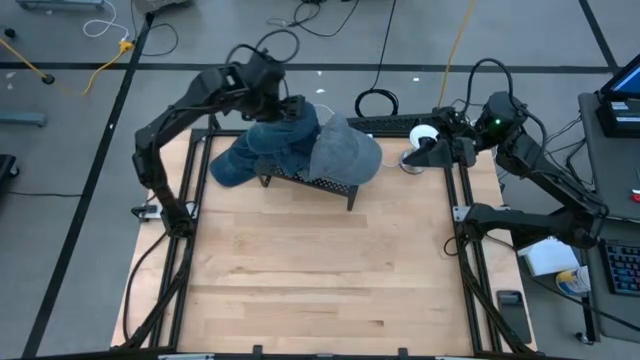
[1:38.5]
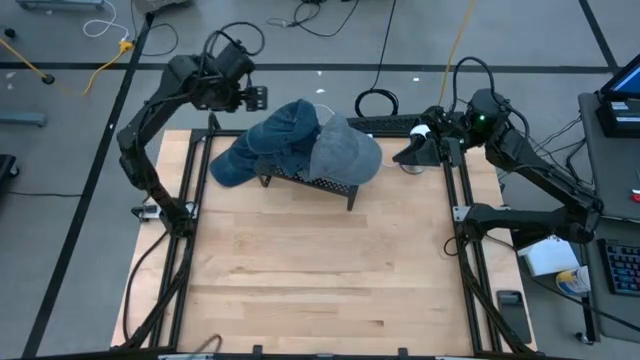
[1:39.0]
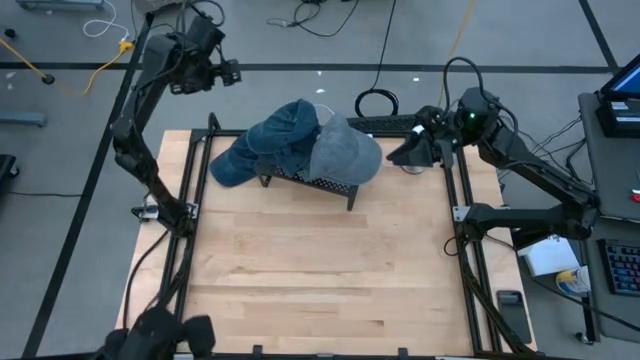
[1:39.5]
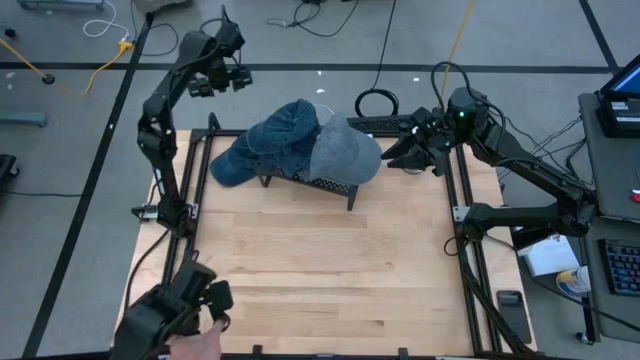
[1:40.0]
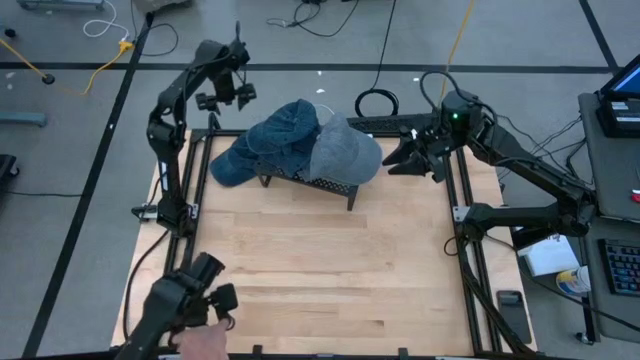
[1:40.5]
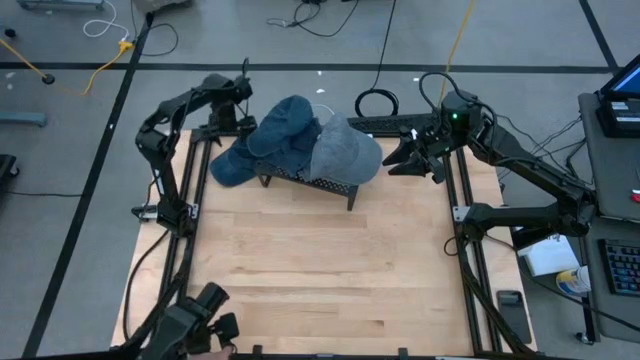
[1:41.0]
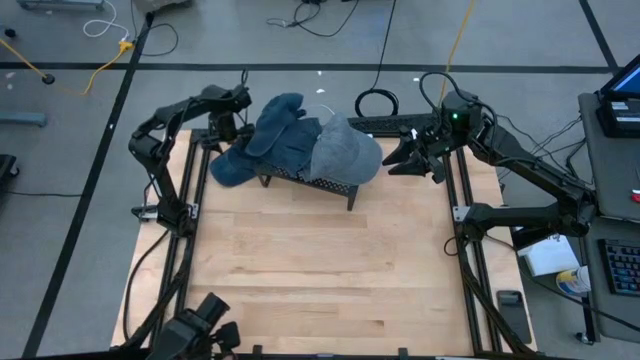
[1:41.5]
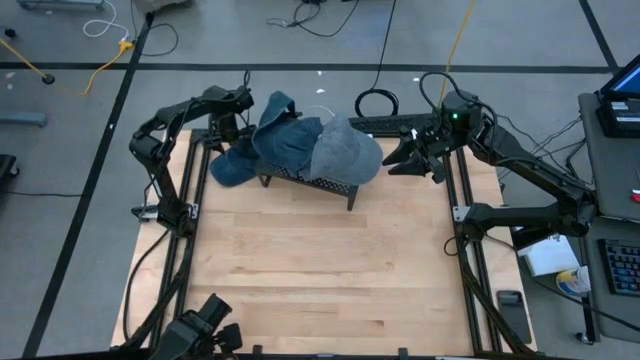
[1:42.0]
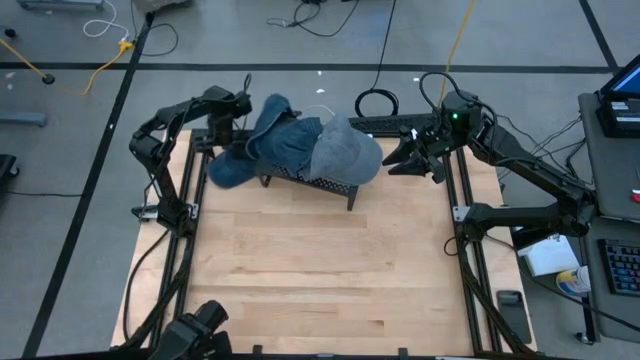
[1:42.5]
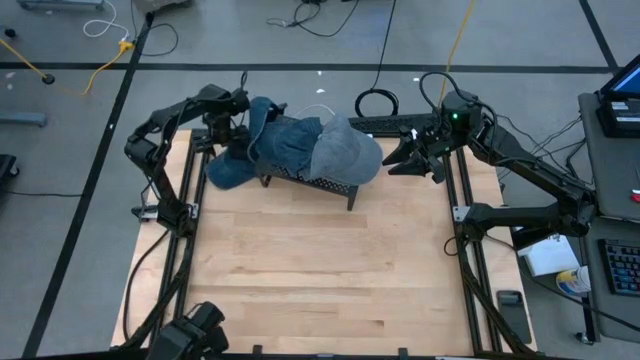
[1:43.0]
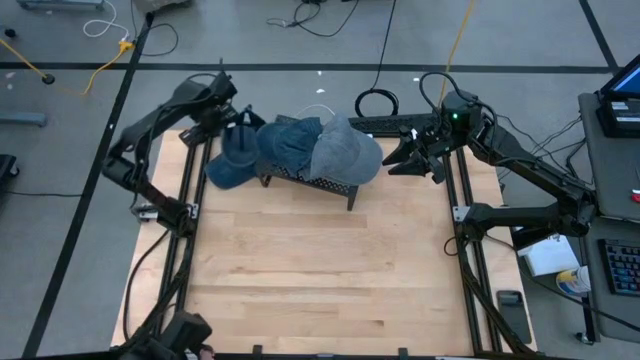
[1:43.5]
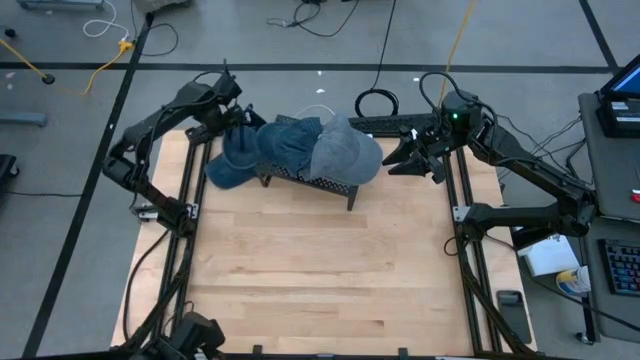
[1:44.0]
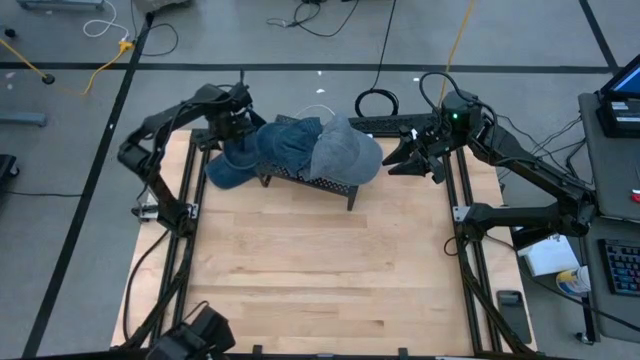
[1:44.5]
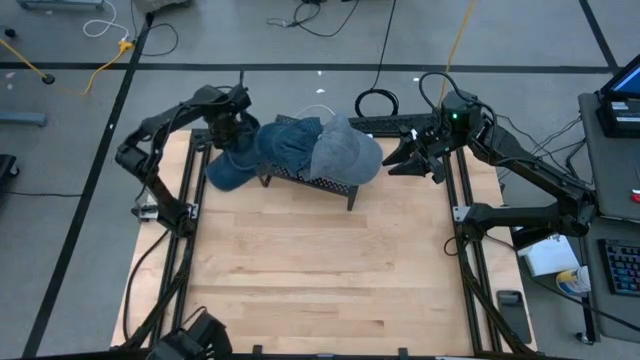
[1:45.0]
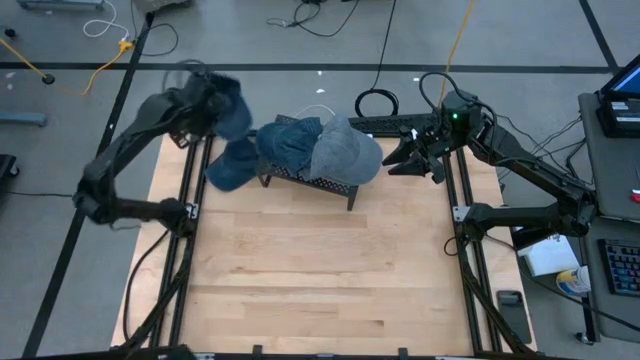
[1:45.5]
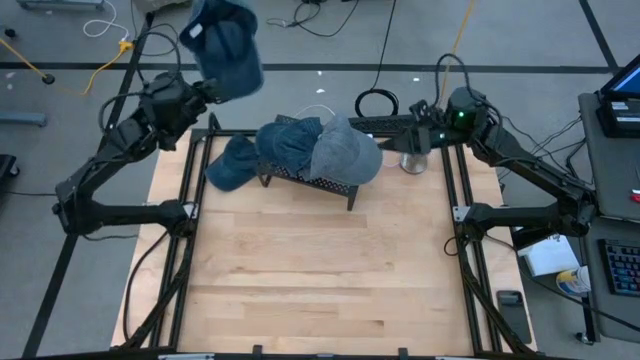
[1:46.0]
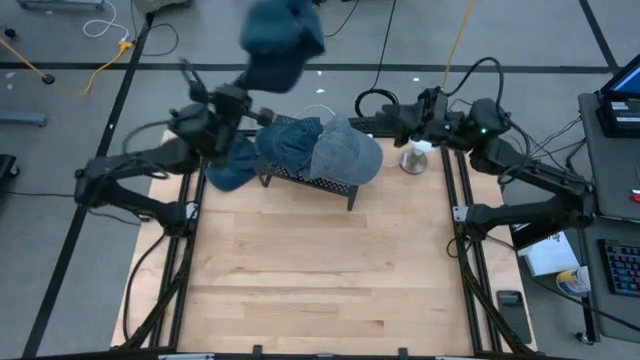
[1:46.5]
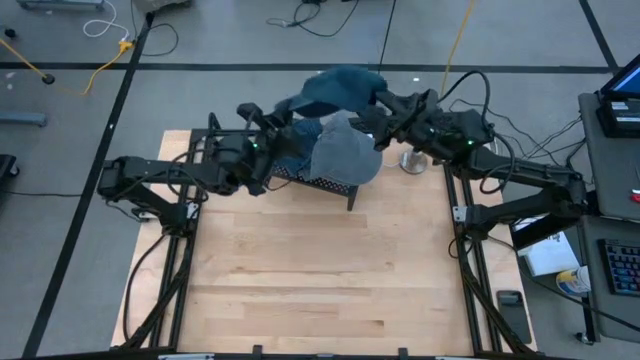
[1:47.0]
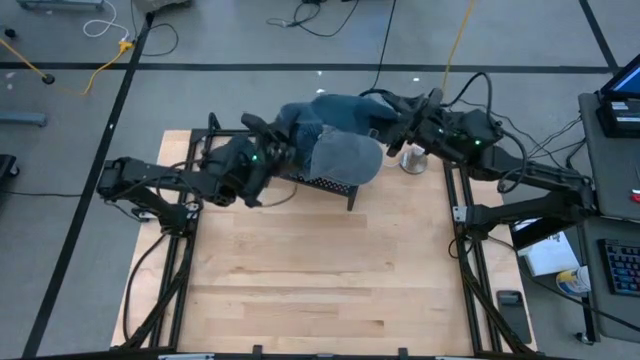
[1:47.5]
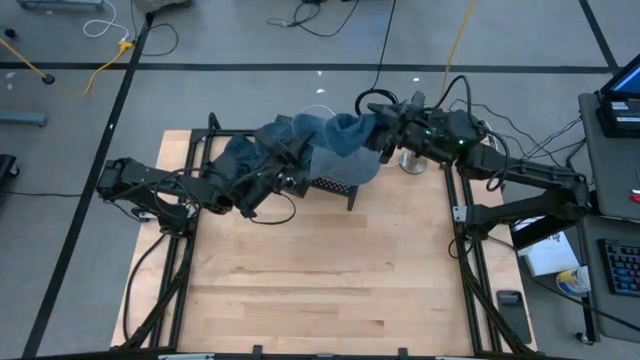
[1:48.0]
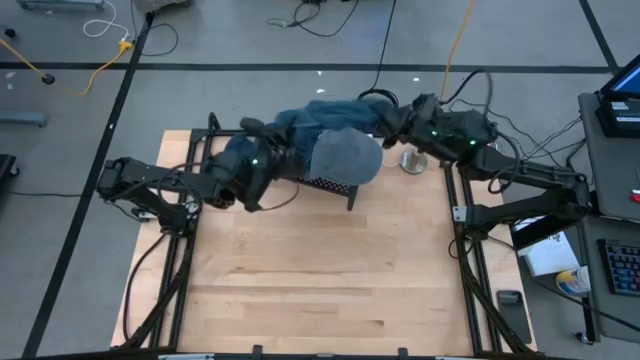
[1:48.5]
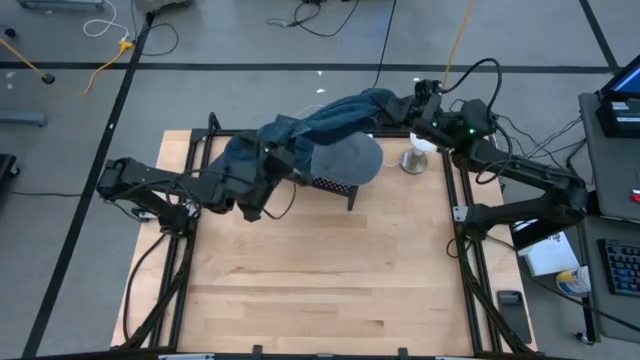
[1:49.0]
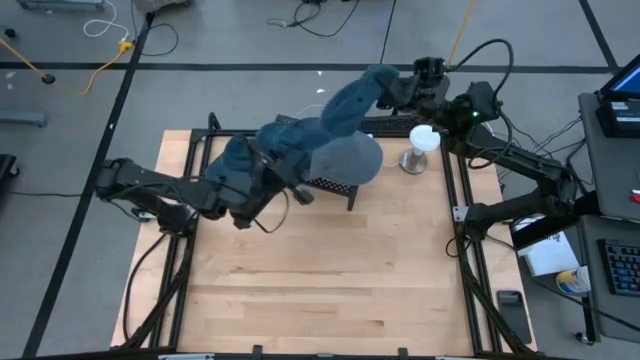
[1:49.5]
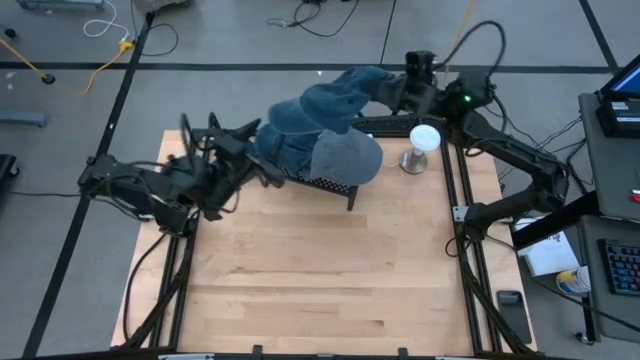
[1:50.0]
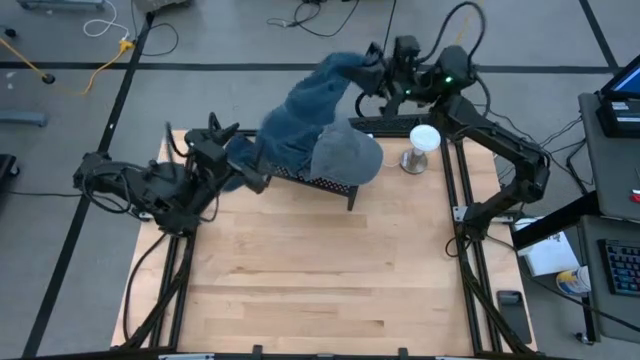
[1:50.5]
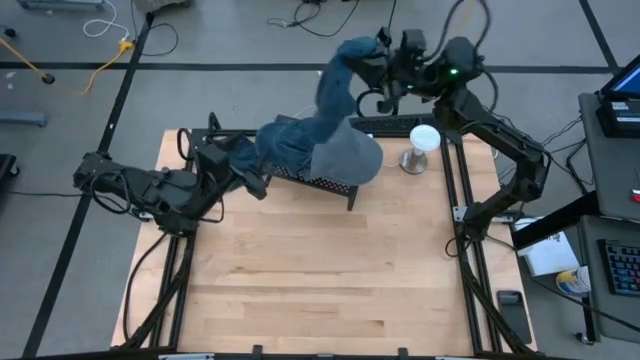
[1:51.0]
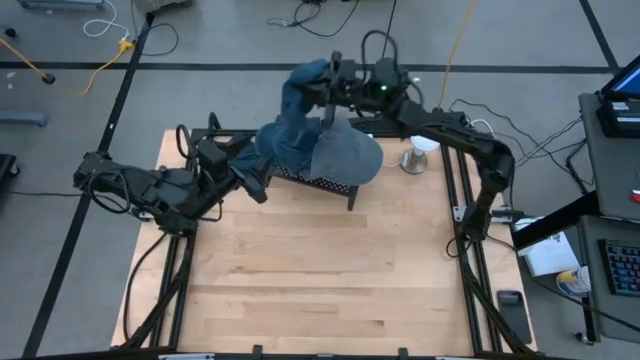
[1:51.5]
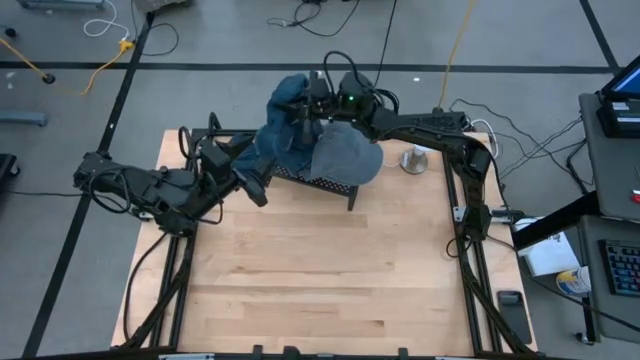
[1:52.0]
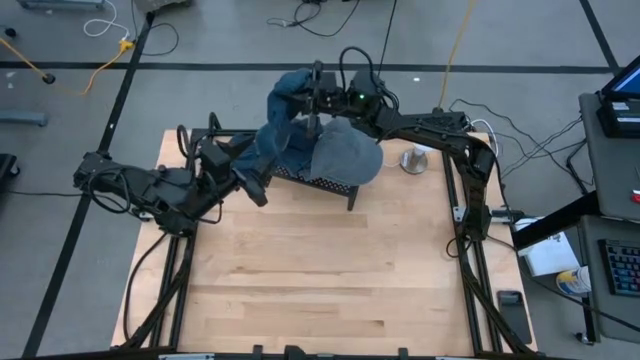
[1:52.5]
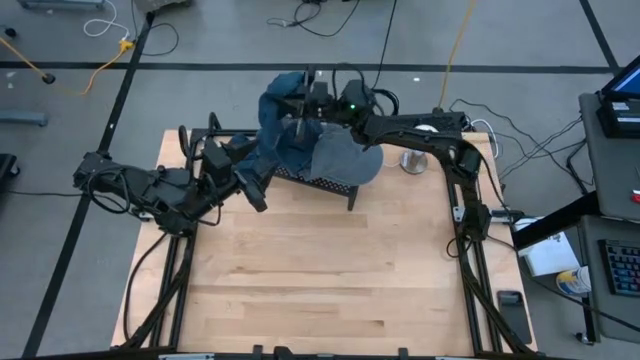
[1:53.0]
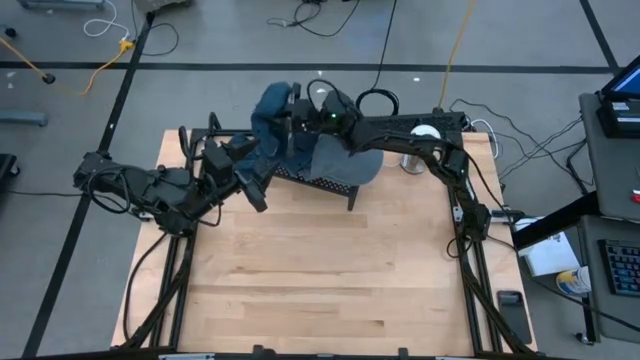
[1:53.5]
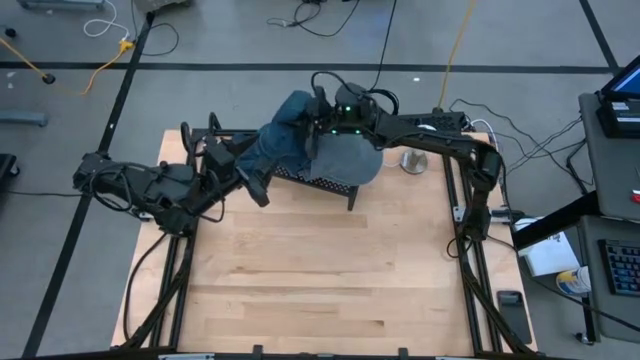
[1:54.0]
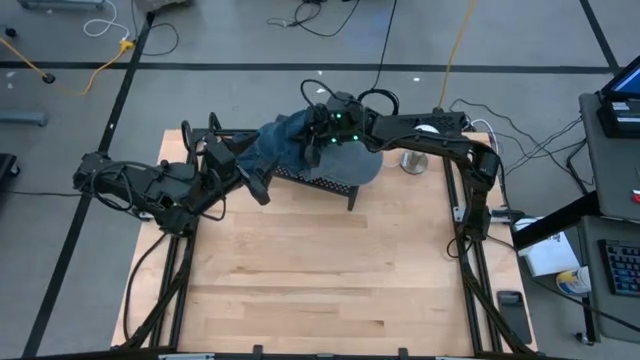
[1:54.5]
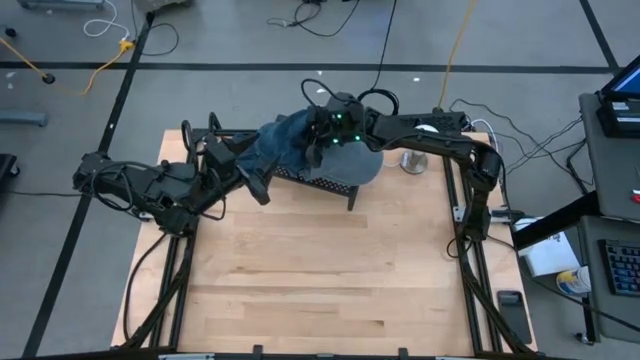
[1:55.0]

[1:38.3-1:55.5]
Task: Pick & Place hat
Stack the blue cap on the blue cap on the shelf

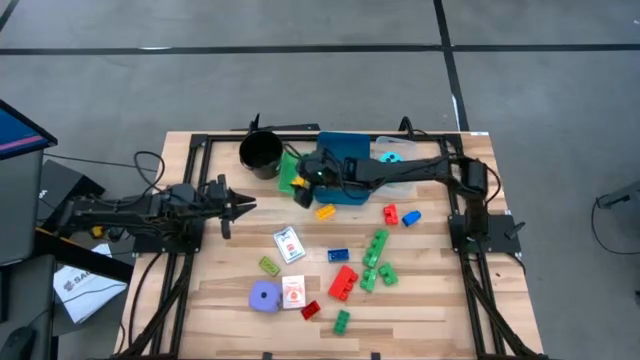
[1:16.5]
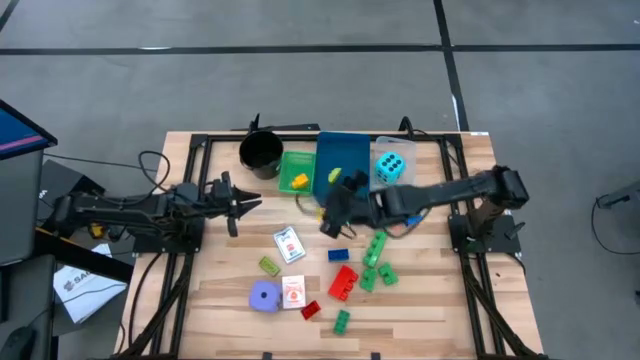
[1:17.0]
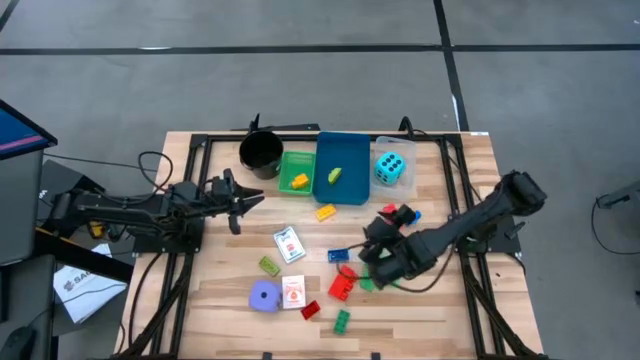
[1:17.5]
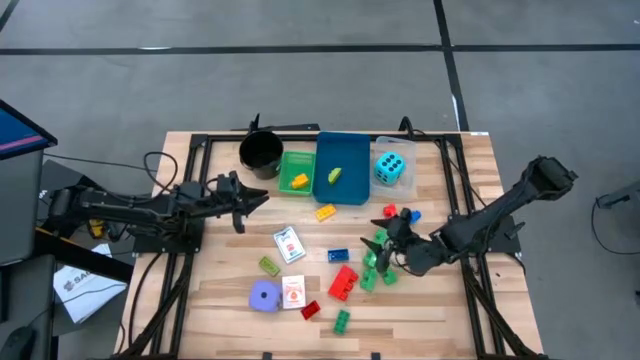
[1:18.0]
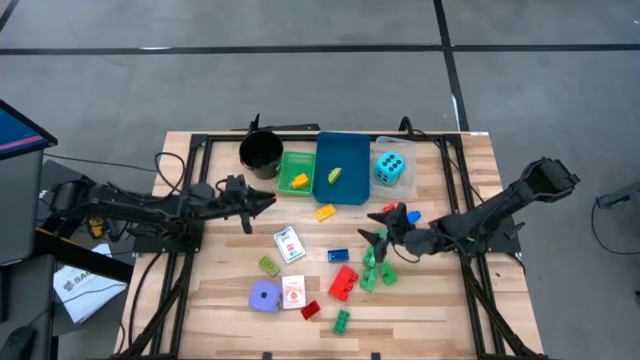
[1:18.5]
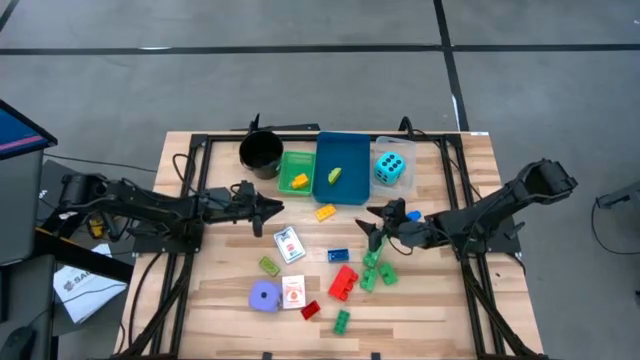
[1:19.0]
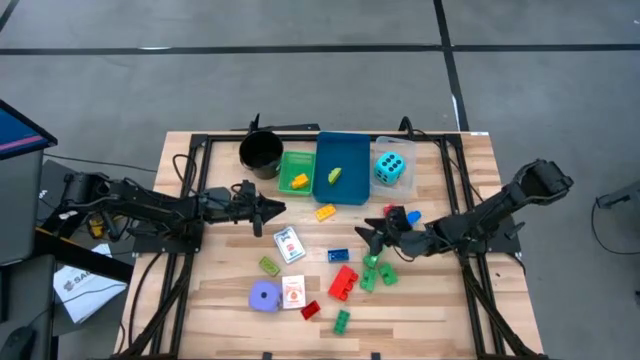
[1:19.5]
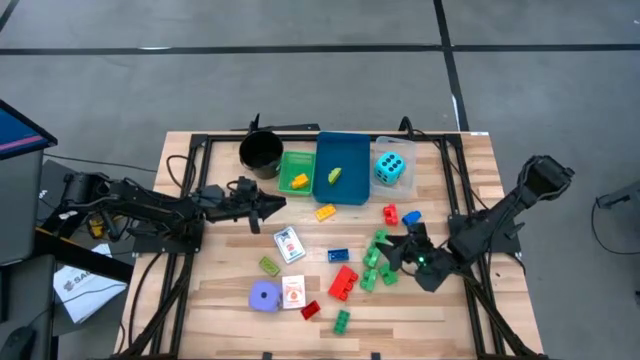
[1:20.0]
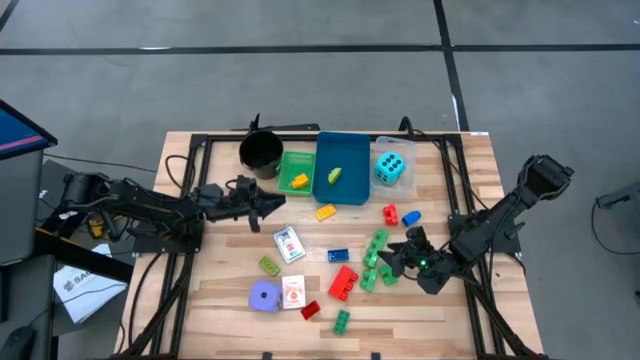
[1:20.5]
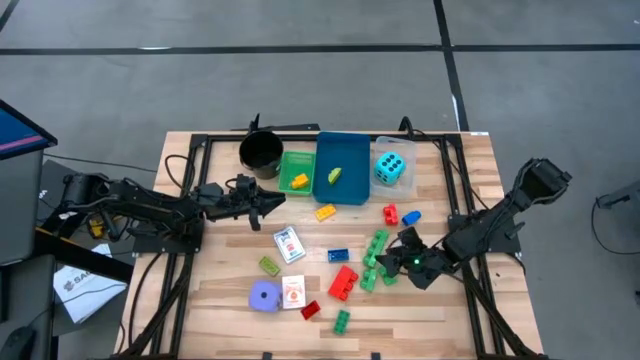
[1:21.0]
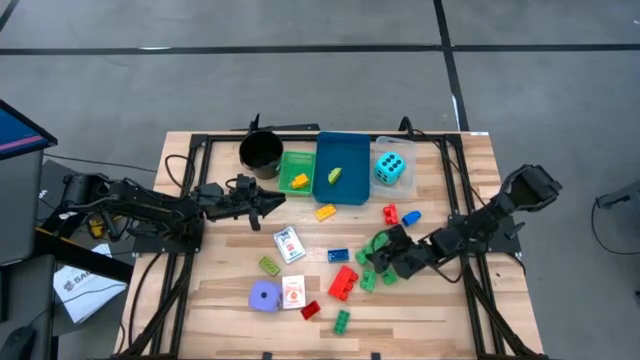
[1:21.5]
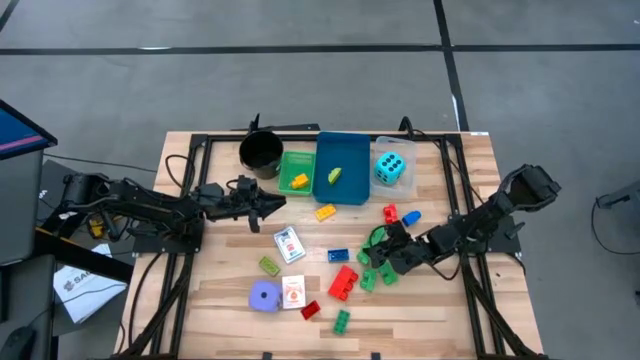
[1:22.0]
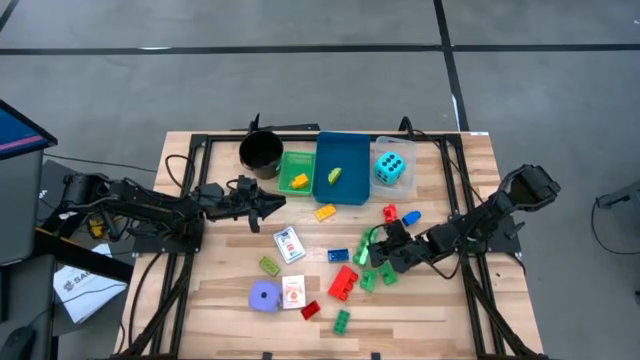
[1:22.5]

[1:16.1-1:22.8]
Task: Pick & Place Toys
Put the large stud green game piece into the green bin
